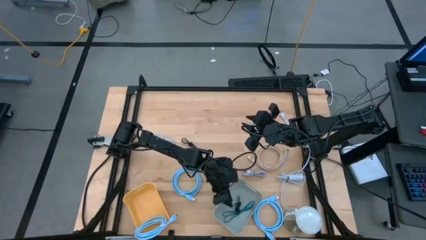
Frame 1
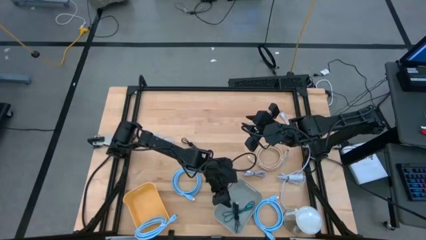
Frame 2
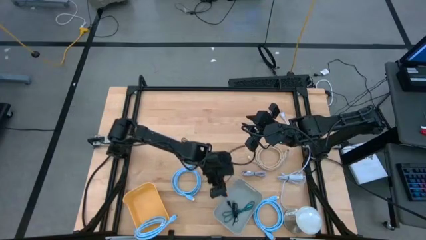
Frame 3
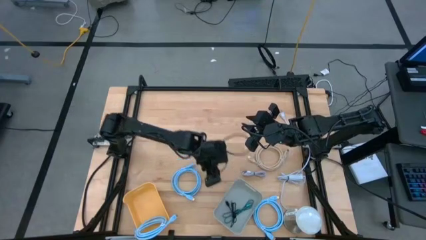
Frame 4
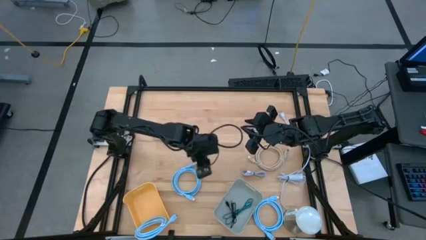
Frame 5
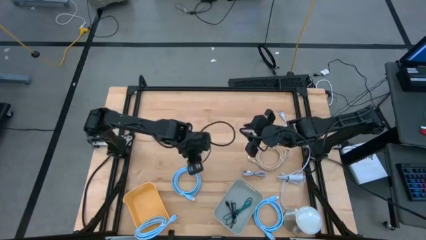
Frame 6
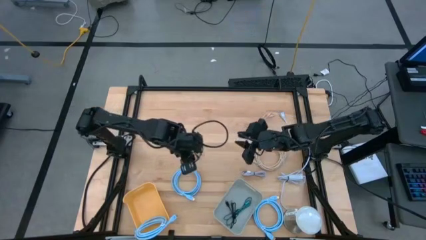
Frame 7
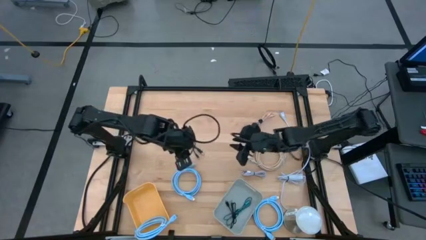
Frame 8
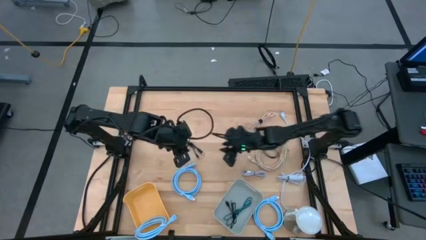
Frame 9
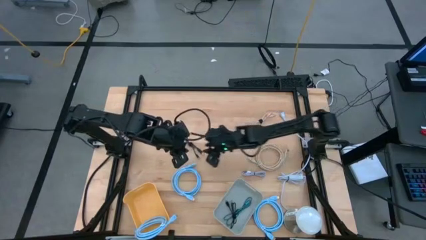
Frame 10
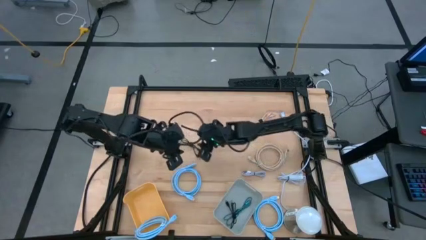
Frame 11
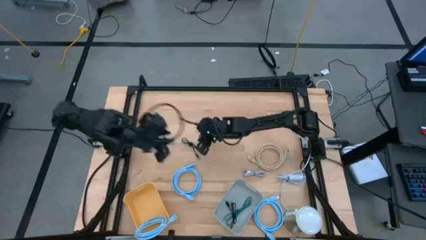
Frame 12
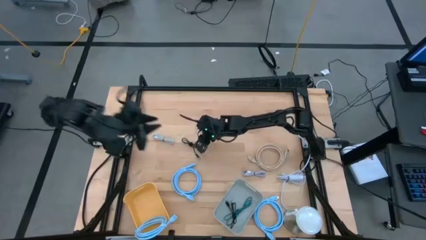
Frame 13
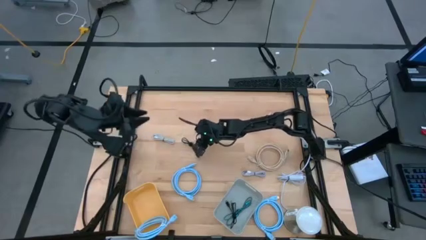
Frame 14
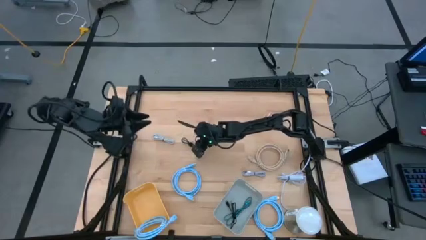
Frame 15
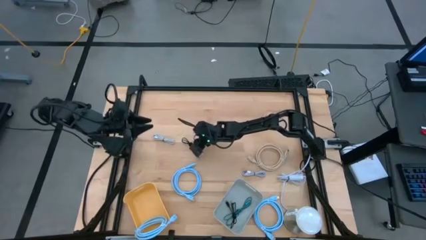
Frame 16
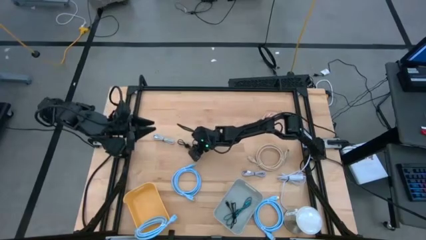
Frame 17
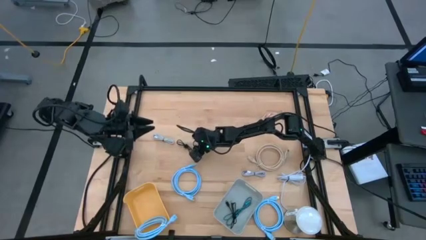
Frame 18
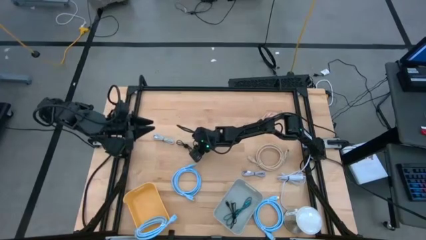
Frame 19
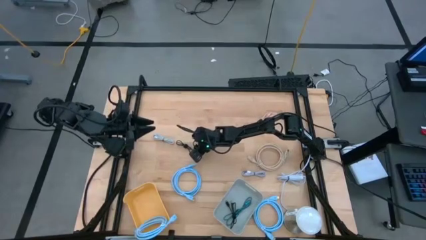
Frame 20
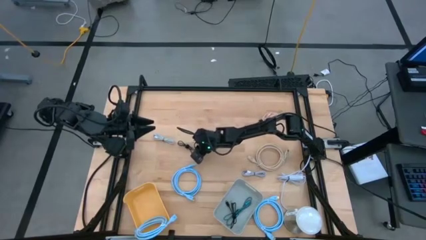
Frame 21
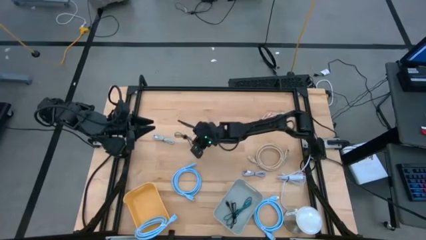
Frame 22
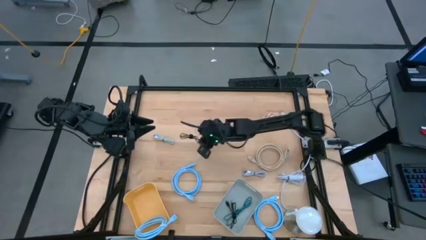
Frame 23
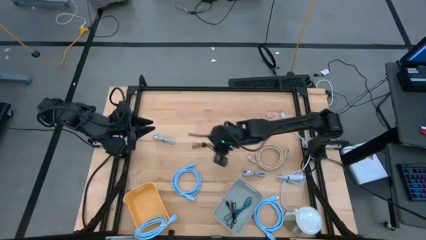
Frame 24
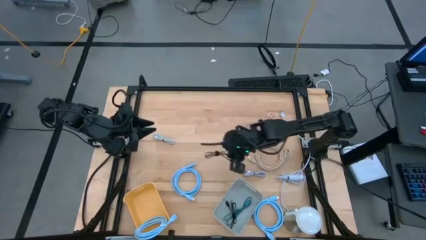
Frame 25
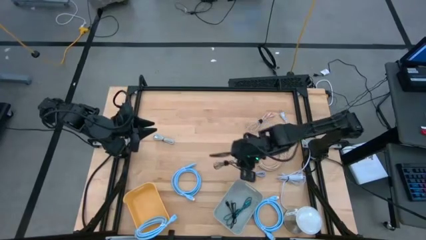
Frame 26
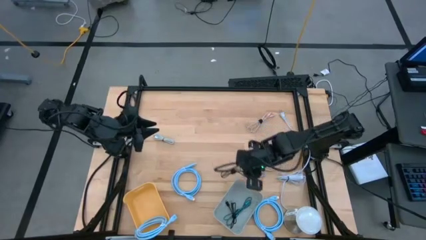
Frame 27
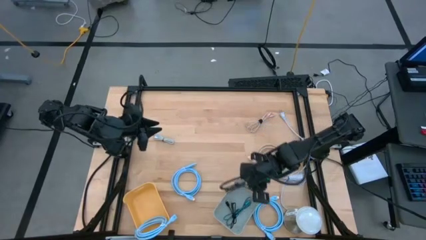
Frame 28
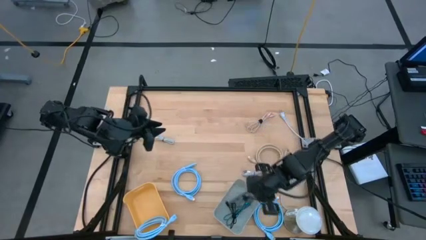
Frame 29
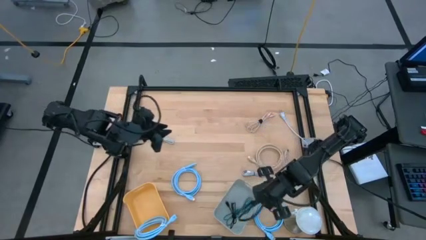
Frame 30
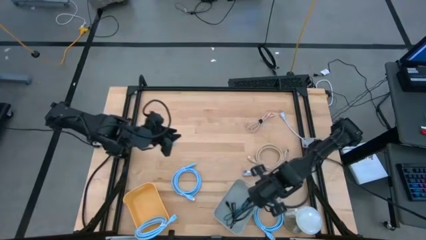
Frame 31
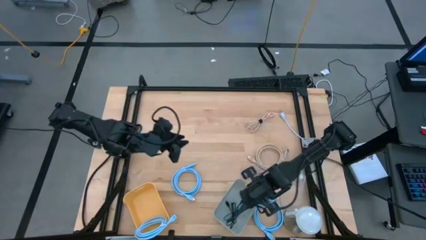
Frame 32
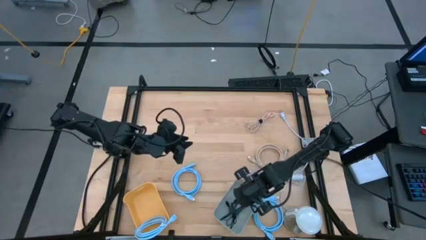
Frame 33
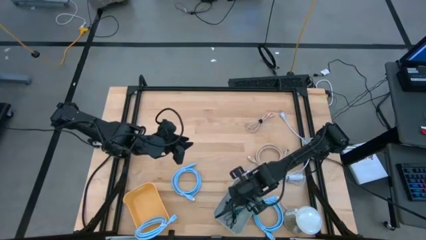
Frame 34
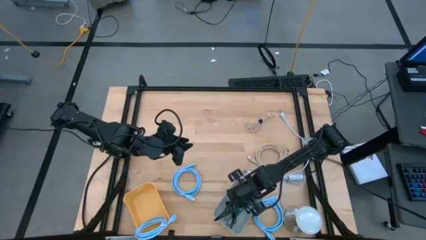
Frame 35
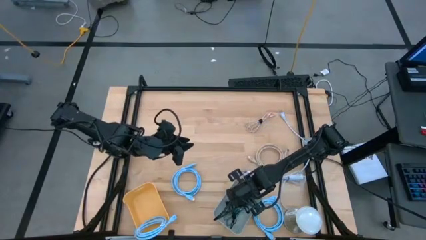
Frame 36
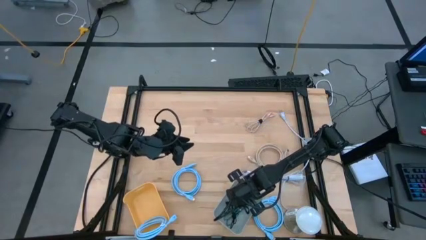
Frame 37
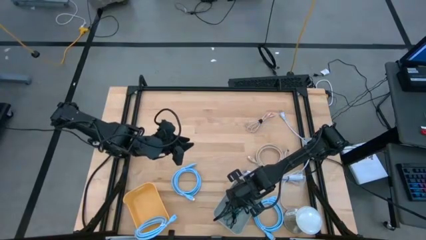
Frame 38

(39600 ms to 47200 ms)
Task: Sort cables
Put the black charger cable into the gray bin

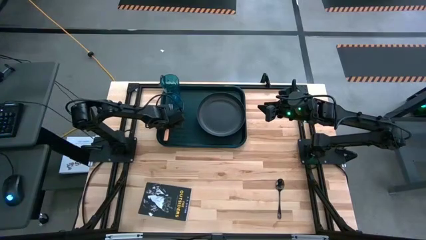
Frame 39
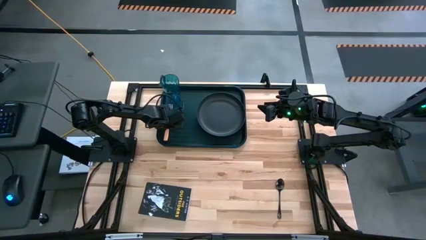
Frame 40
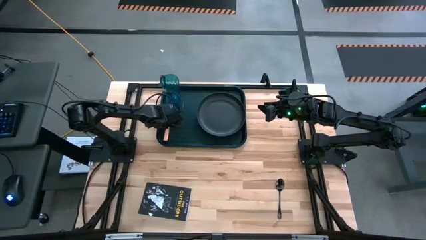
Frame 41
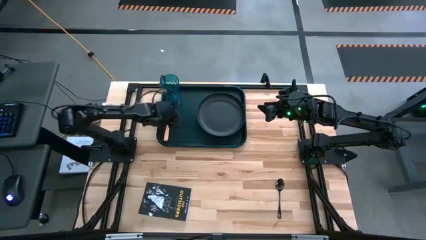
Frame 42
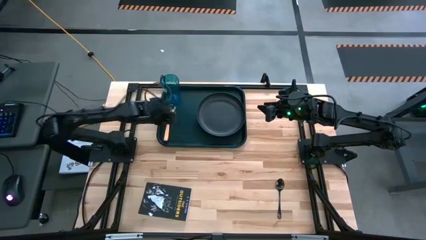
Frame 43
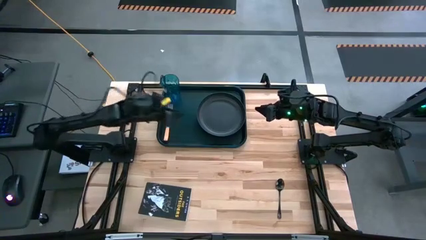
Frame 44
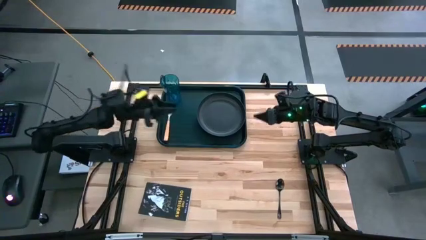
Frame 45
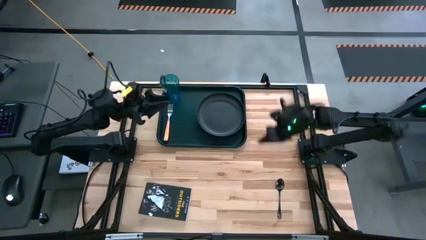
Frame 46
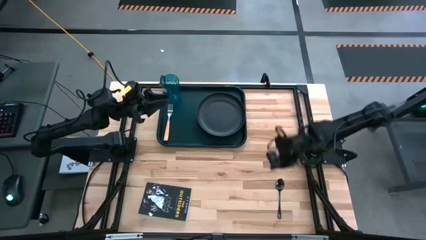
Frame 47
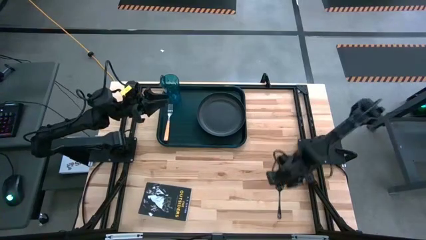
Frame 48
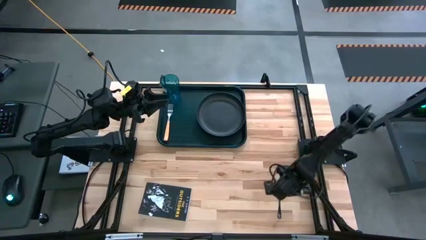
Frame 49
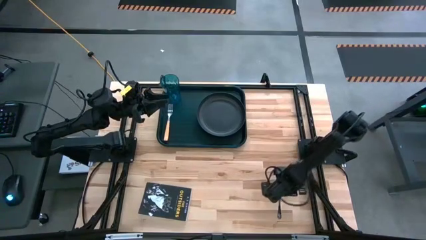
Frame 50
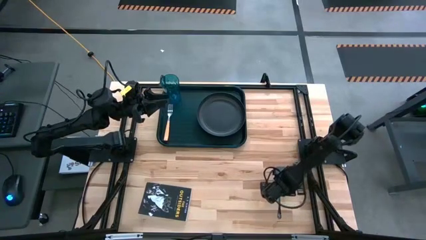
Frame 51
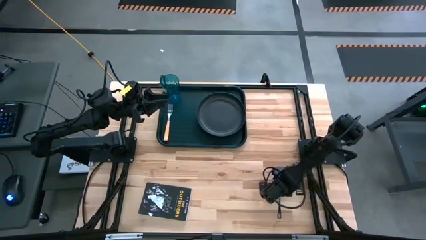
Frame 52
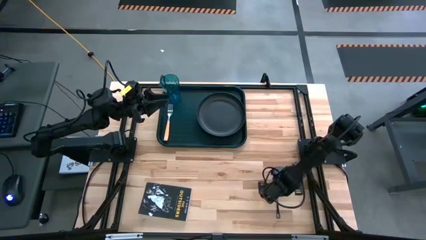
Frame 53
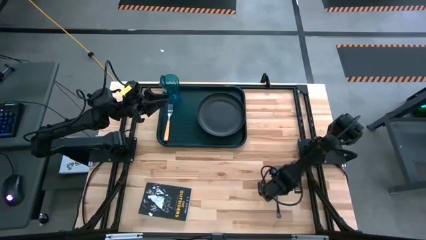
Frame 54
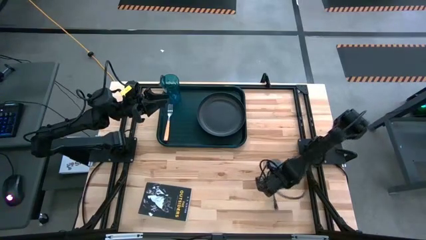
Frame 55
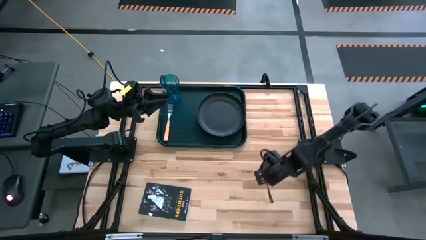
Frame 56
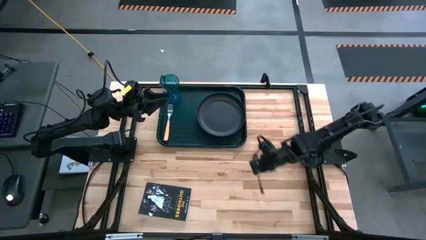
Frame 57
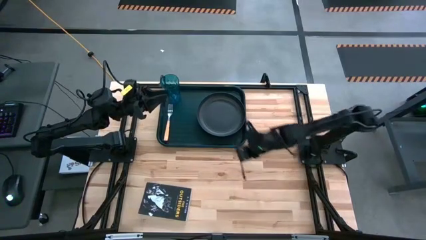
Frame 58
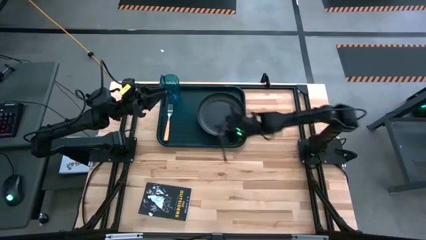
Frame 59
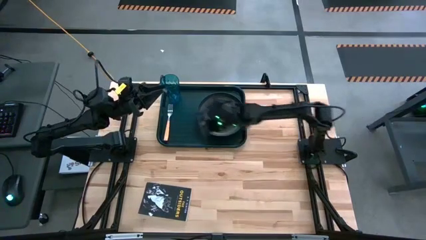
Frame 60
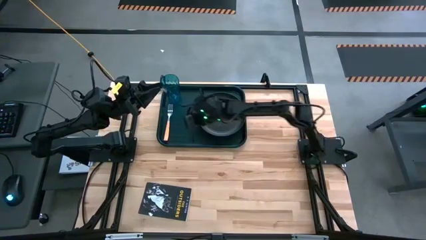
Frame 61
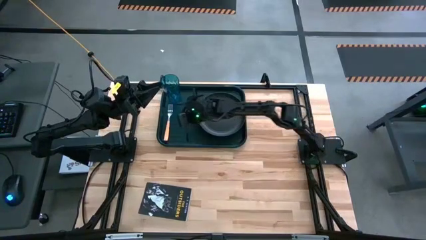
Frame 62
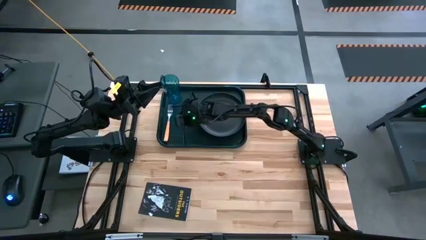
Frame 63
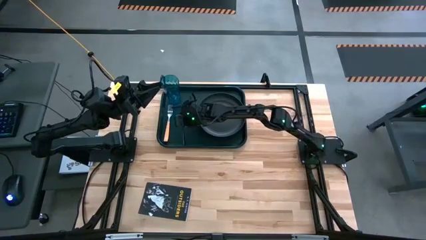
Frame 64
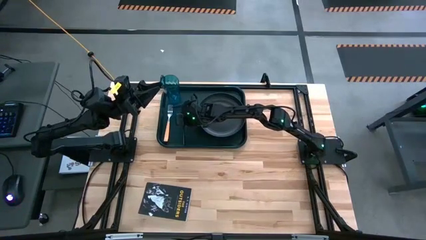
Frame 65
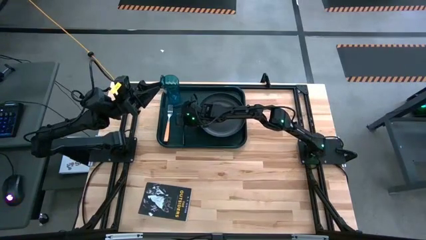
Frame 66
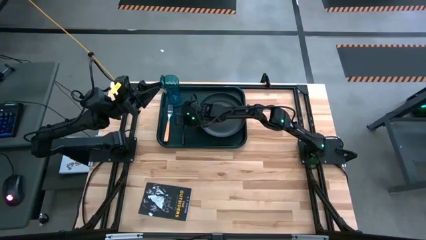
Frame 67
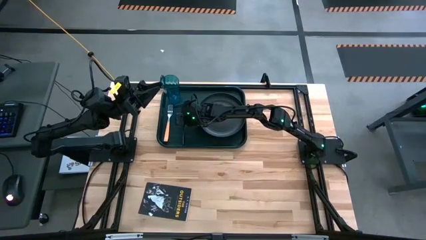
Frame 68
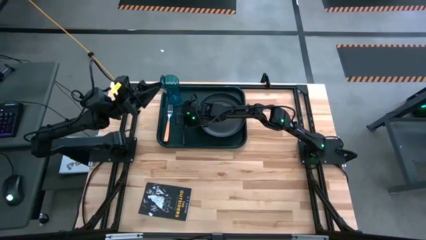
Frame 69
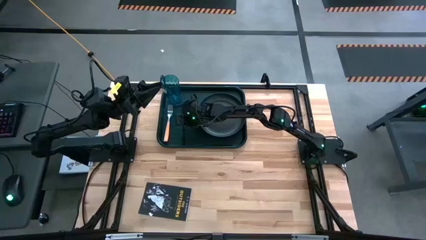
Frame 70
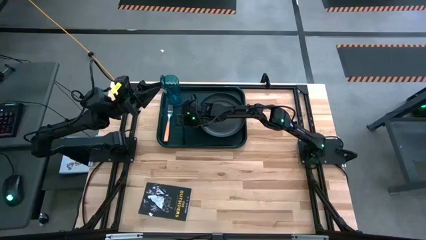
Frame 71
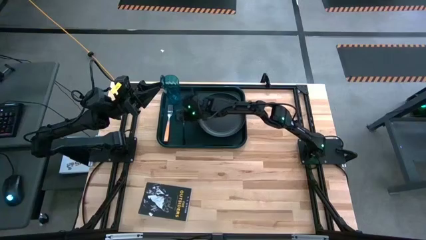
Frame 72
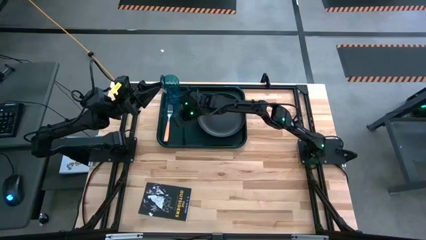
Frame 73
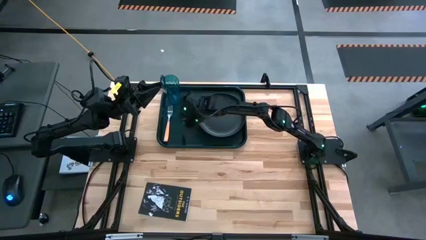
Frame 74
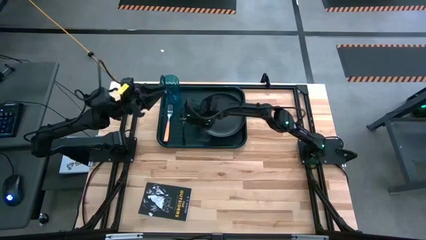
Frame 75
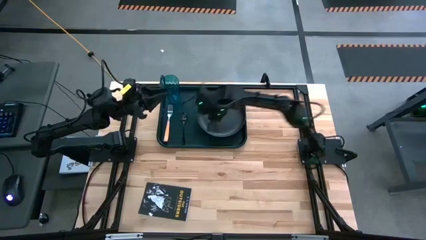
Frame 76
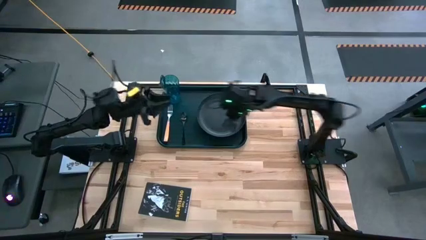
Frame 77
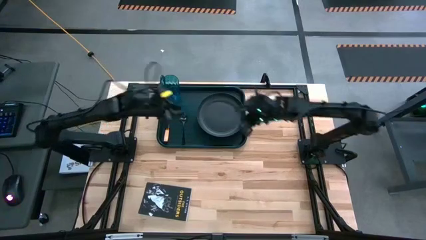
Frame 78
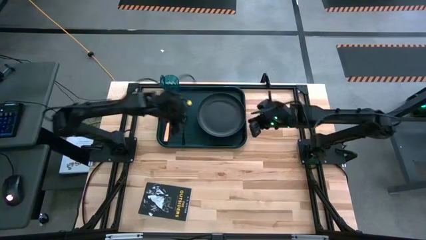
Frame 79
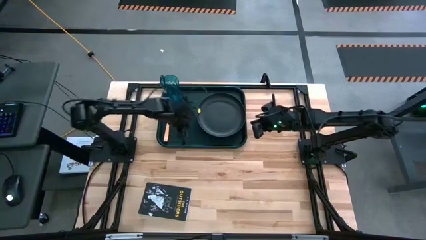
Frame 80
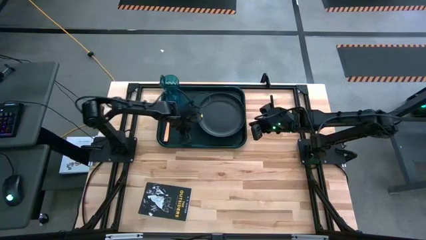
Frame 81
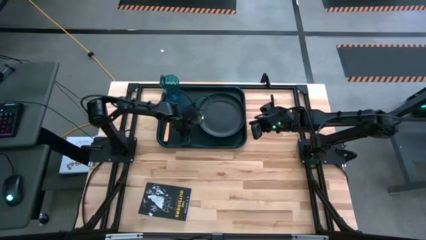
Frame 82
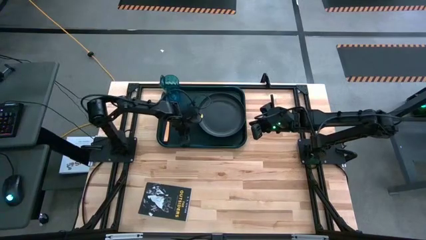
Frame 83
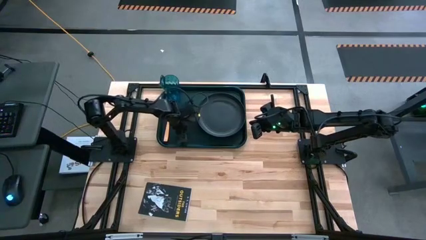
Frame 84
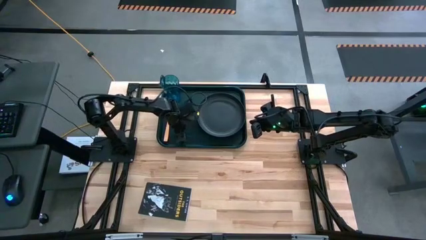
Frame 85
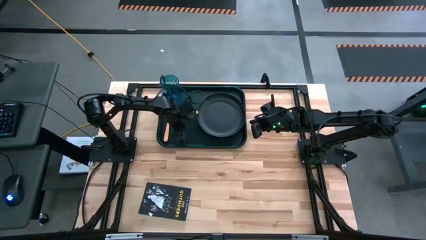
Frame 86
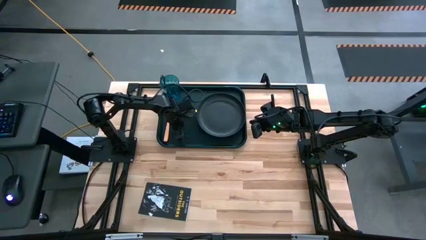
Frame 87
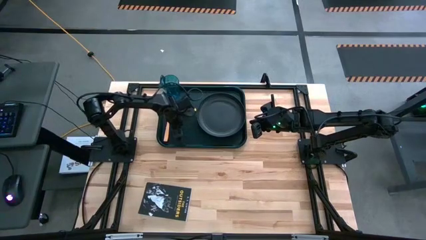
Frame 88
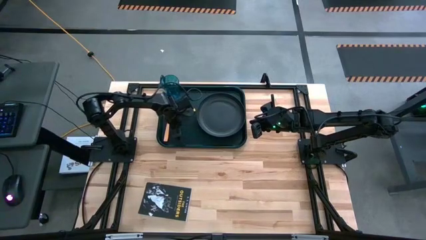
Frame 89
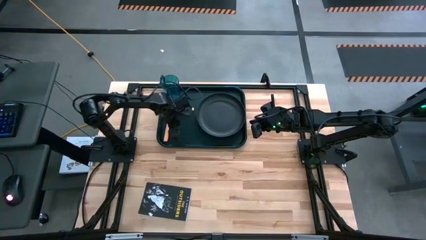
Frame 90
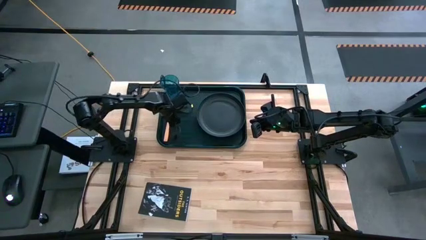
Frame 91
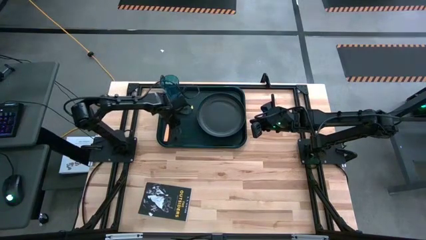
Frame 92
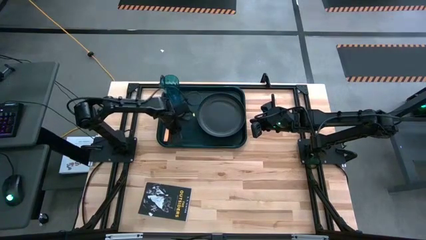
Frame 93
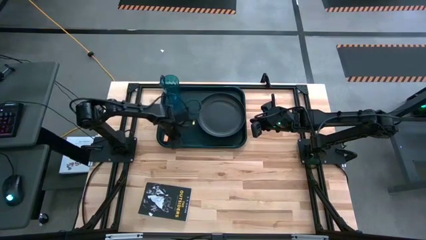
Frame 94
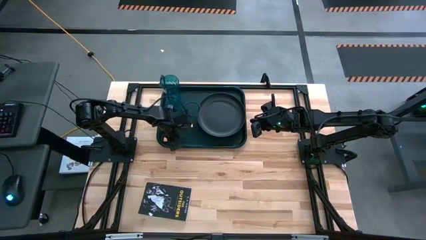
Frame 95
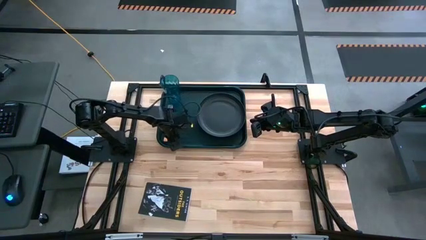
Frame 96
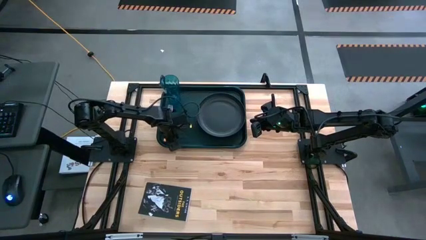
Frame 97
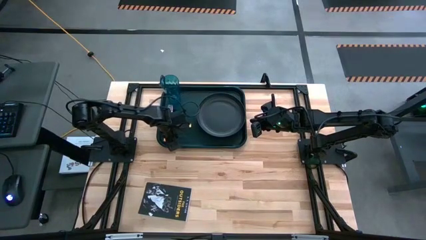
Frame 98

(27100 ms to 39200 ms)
Task: Pick and place plate/cup/fork/spoon on tray
Put the black spoon on the dark green tray to the right side of the light orange fork
